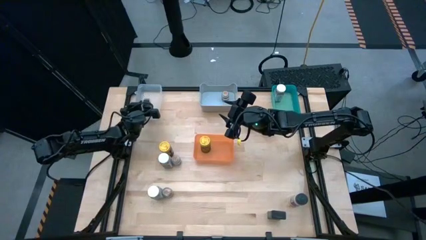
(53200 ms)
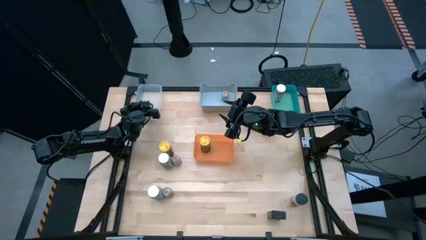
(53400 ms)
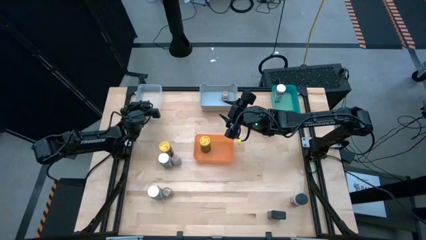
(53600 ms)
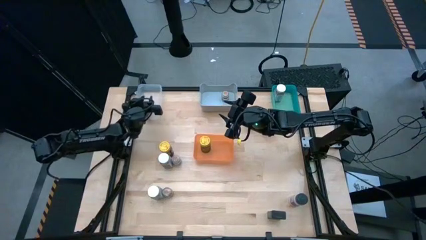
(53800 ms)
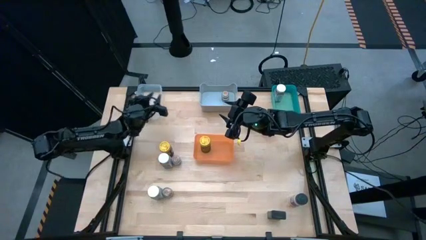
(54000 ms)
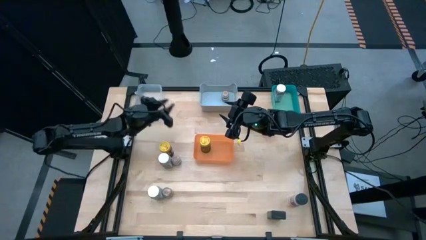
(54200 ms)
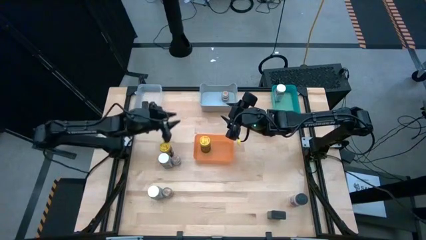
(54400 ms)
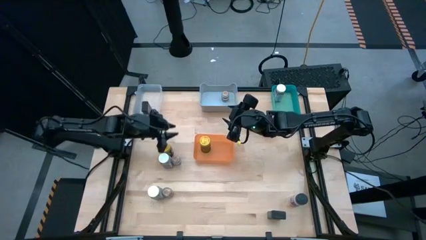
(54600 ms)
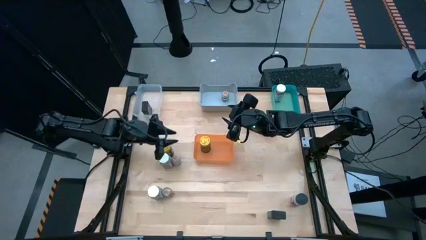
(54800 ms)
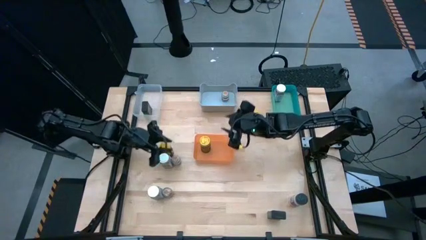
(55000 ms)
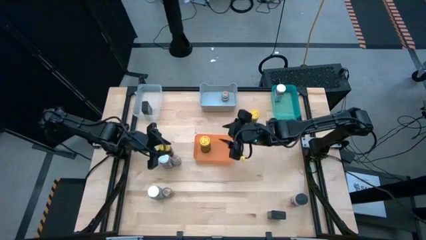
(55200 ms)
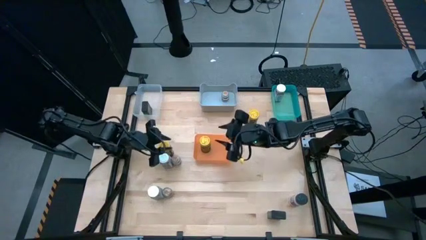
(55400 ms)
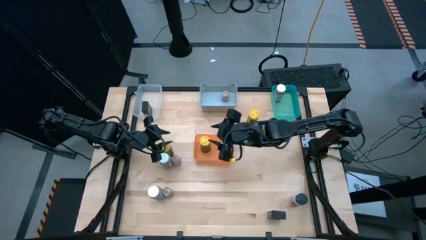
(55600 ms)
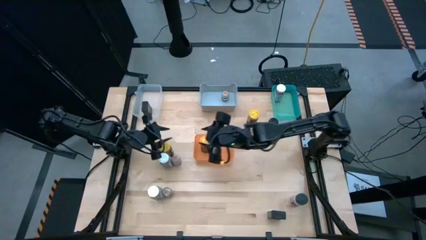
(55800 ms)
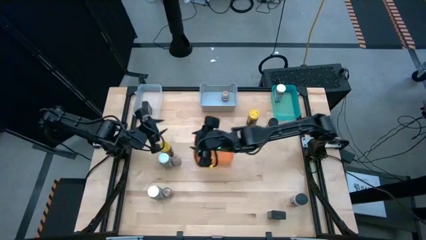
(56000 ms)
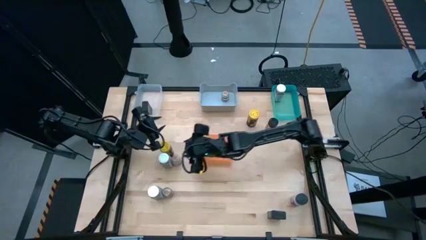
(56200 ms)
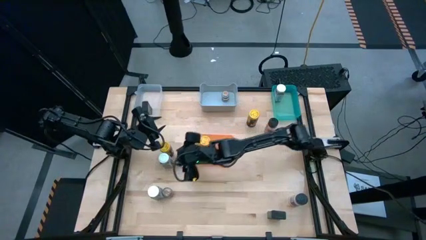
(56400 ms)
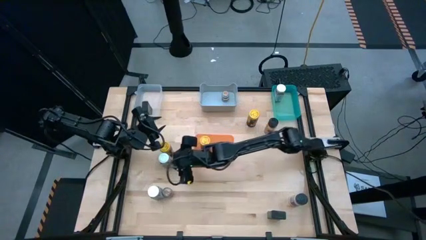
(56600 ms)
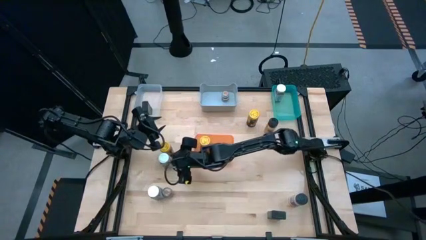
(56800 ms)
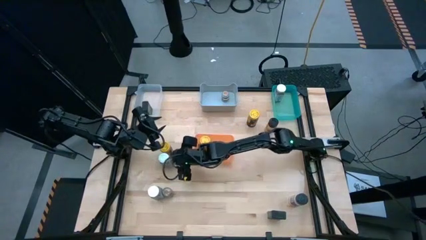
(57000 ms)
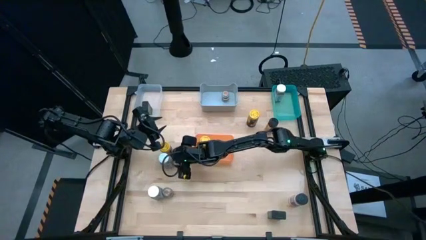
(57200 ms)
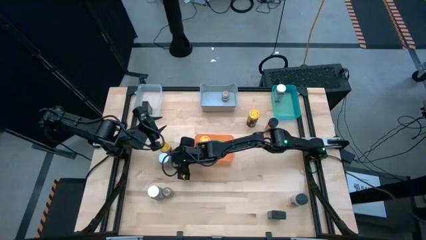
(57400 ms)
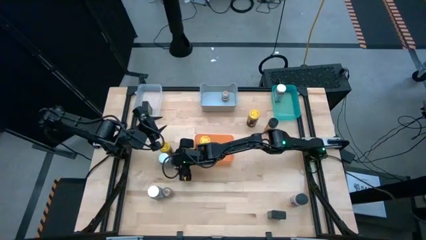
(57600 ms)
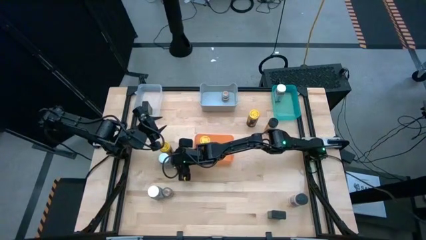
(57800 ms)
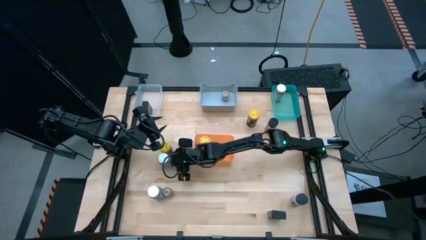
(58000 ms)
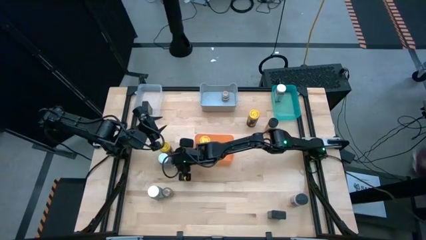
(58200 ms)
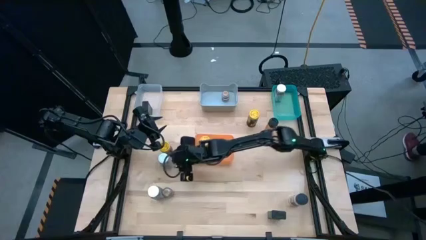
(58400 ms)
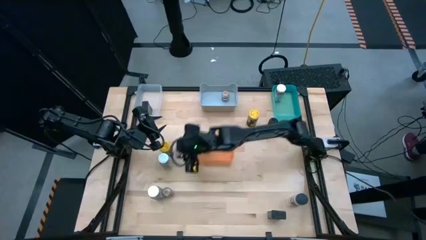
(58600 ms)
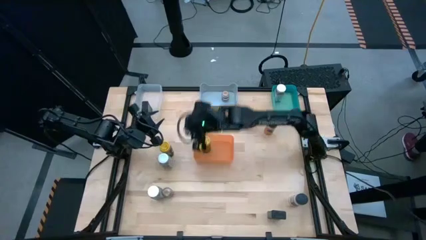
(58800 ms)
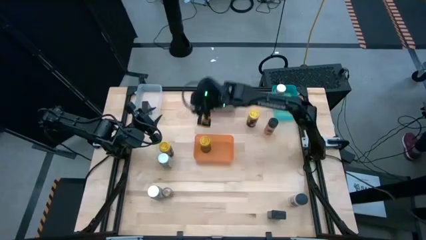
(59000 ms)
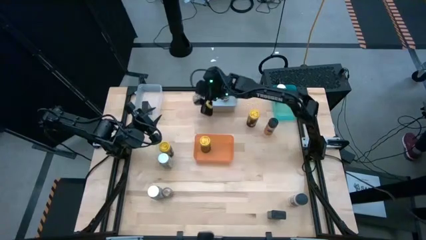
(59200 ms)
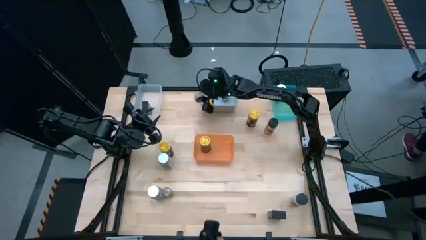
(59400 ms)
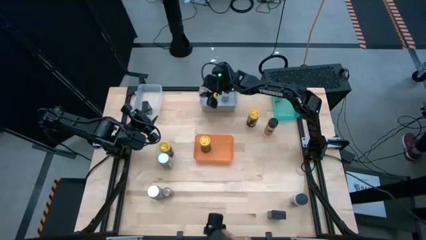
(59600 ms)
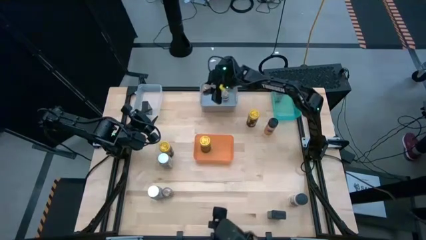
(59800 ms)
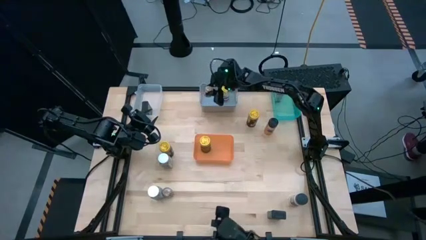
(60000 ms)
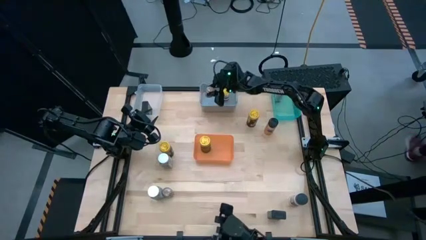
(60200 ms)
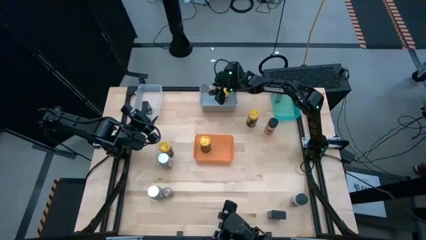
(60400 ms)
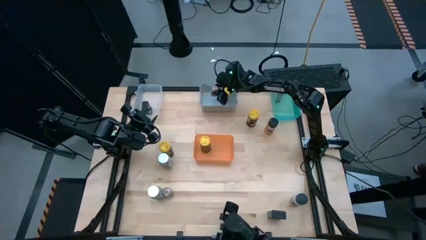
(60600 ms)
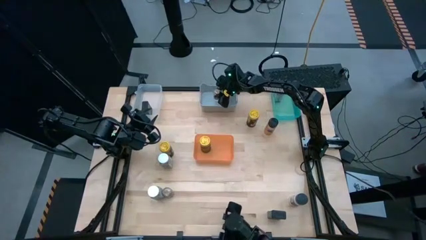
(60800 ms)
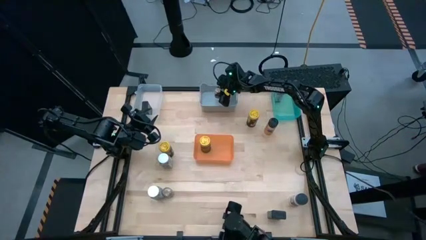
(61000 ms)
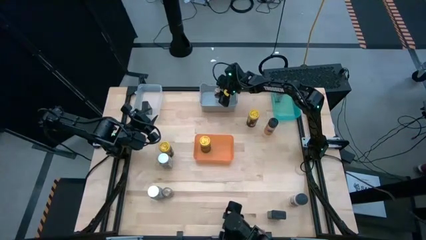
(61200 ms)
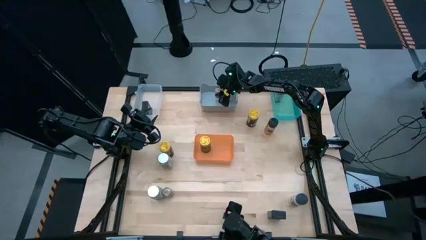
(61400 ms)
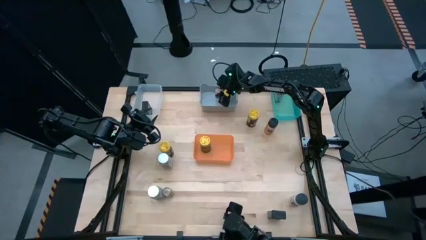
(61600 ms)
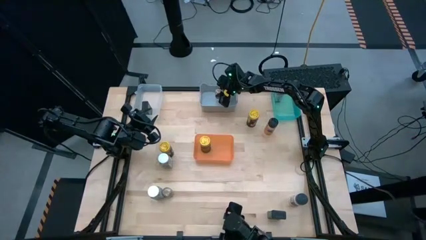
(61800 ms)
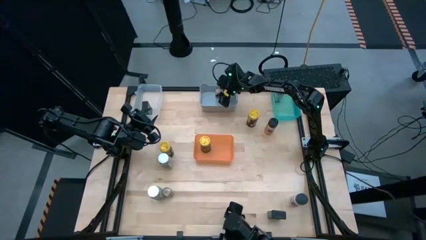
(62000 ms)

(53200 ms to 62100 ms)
Task: Sort spices by type
Put the top brown seasoning bottle into the gray bin

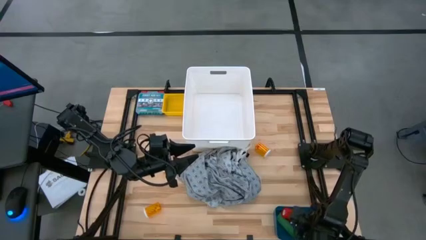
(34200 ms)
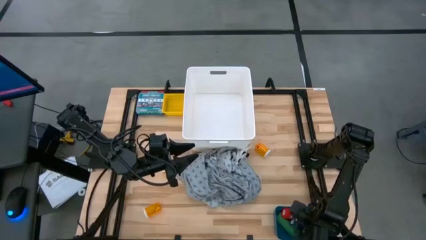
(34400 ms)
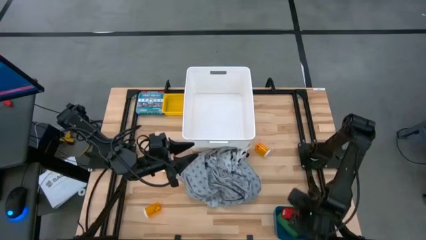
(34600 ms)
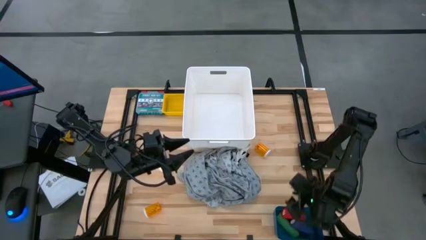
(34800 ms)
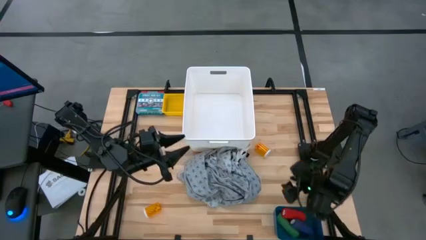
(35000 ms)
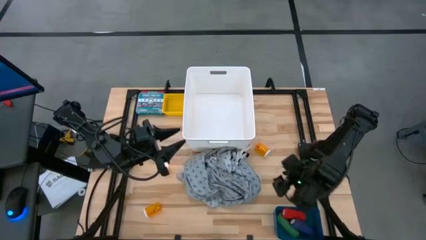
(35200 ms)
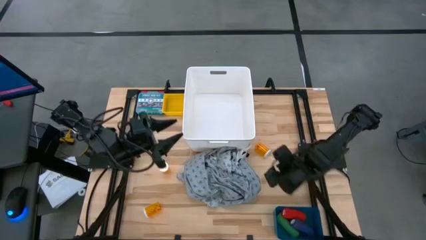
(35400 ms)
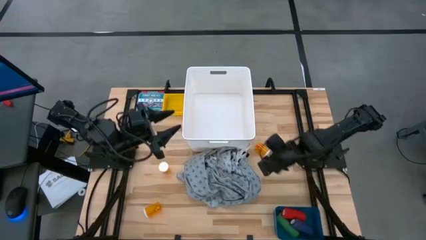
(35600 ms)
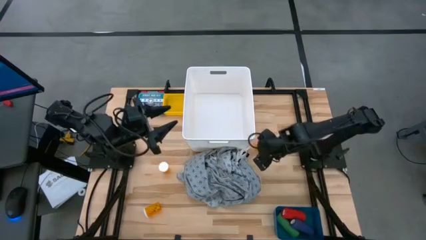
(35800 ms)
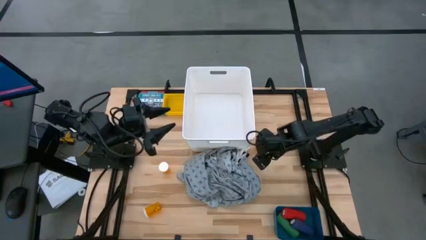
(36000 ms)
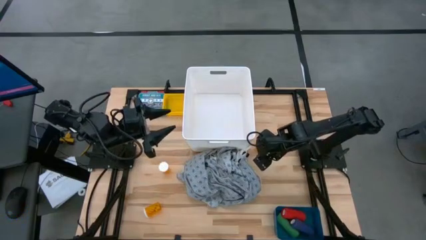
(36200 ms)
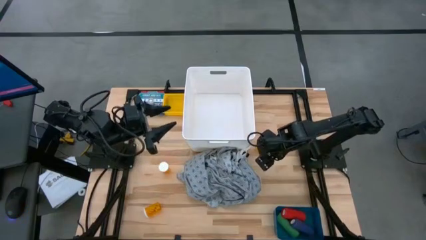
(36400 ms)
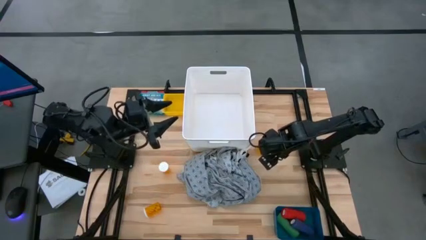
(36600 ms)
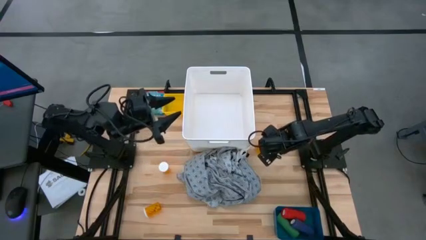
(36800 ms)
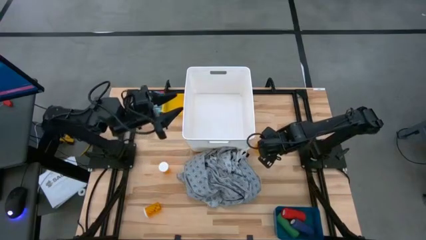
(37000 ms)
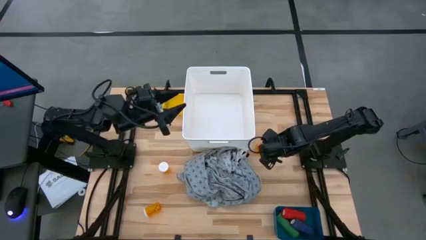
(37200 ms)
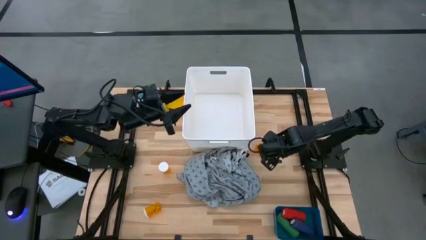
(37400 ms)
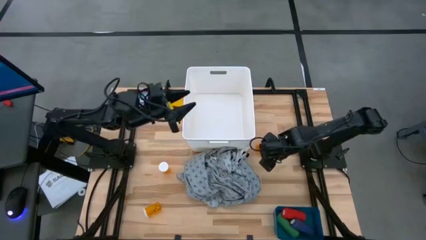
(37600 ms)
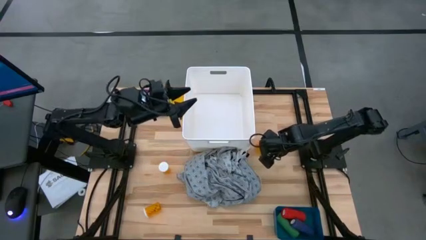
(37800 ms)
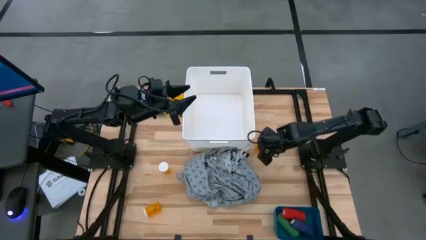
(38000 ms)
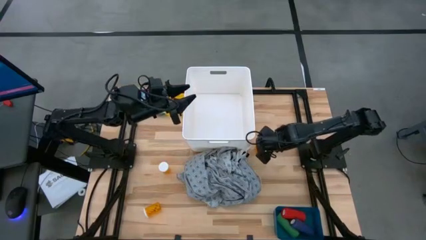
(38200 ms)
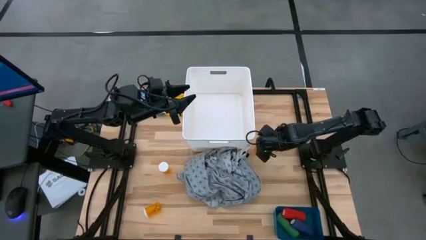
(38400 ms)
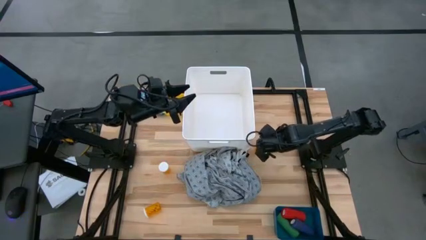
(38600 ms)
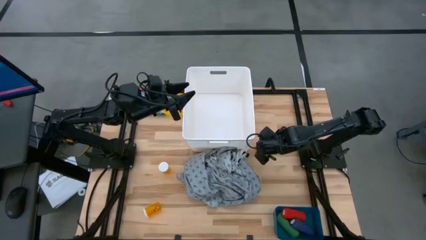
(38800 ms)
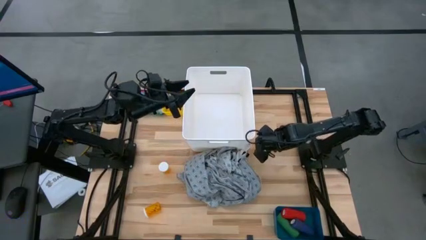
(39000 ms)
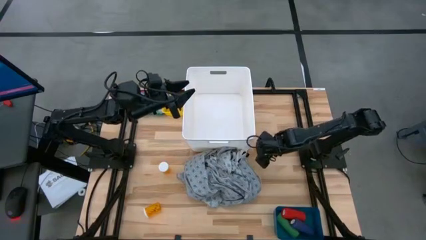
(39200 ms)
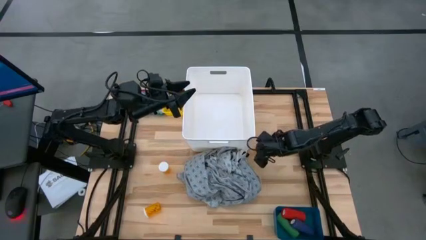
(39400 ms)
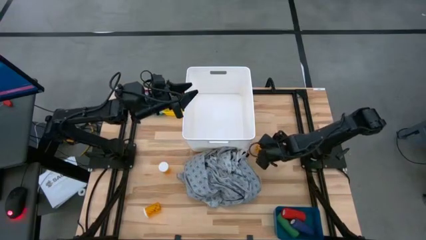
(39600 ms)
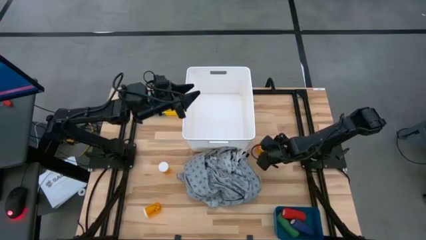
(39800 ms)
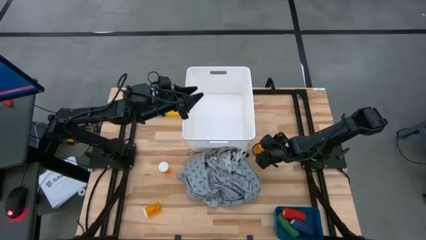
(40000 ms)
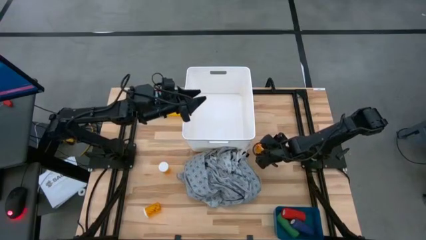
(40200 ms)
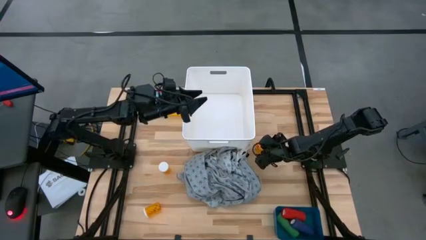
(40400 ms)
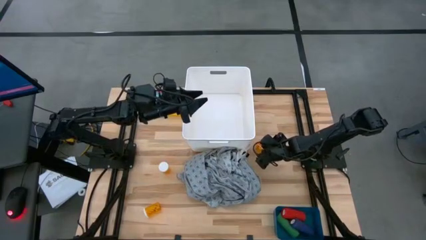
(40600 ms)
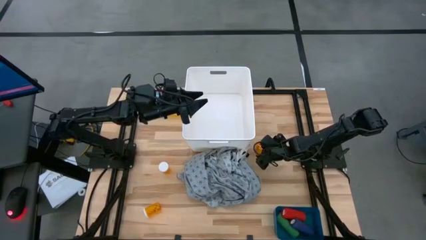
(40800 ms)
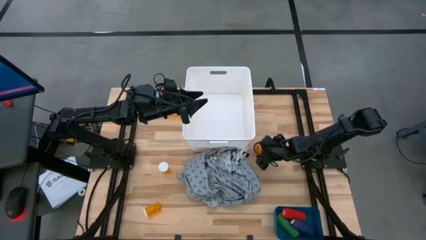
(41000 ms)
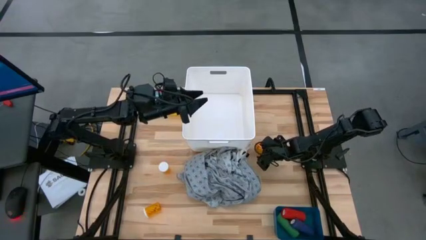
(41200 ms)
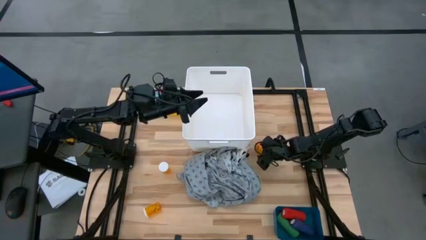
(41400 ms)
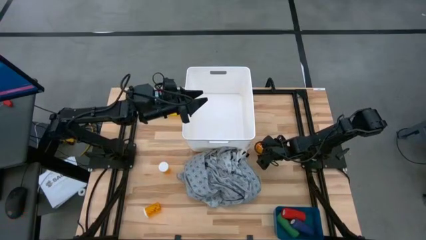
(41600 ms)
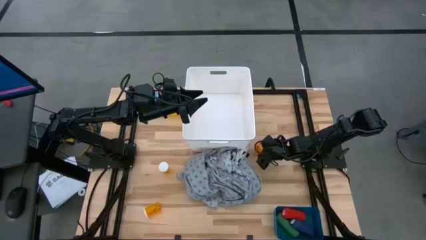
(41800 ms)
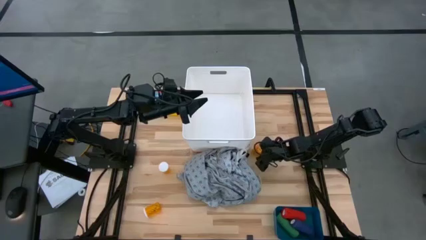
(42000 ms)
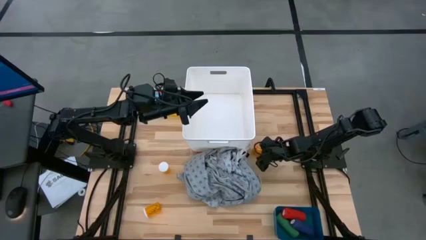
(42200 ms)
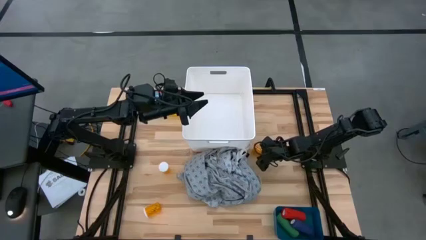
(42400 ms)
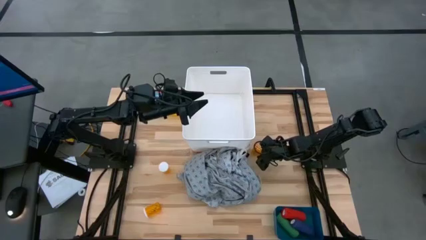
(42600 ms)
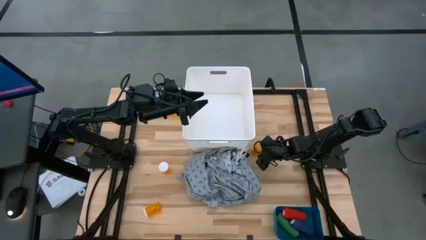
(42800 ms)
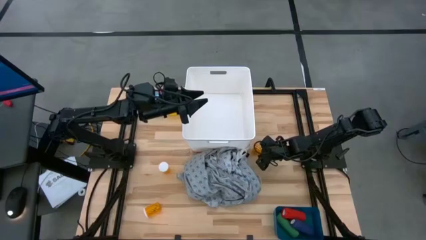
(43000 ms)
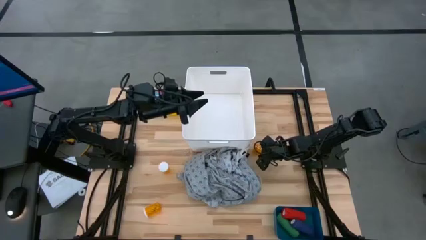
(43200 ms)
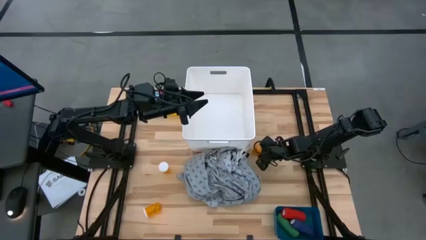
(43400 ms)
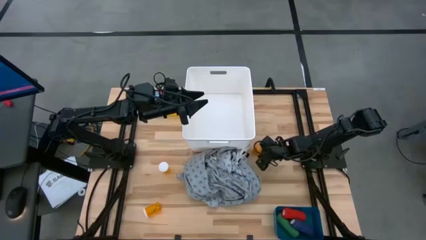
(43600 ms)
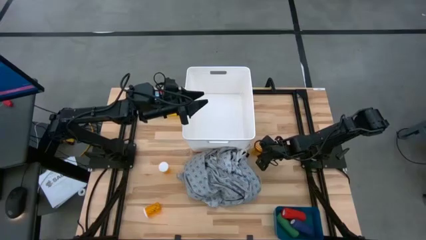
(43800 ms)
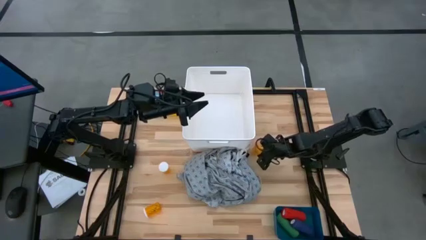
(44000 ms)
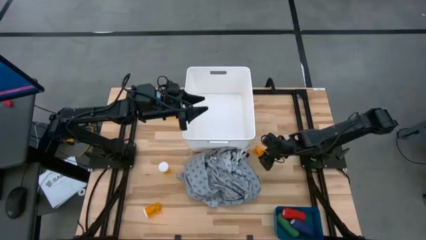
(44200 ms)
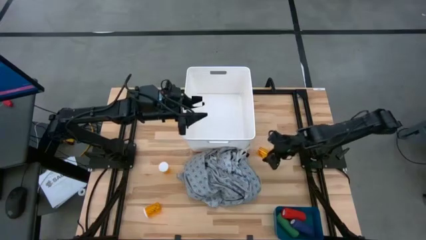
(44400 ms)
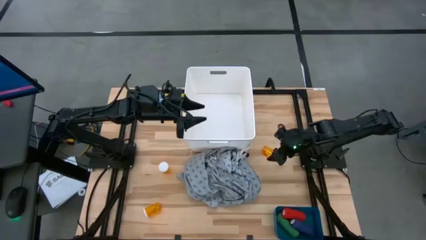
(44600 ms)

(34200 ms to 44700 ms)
Task: Pick & place medical supplies in basket/bin
Put the top orange pill bottle into the yellow bin
